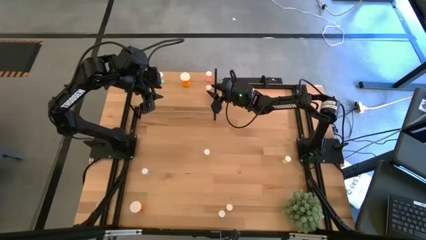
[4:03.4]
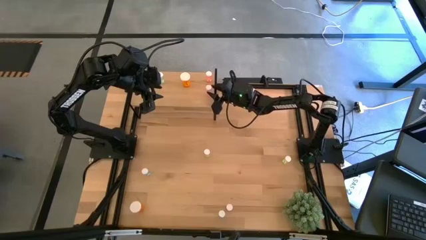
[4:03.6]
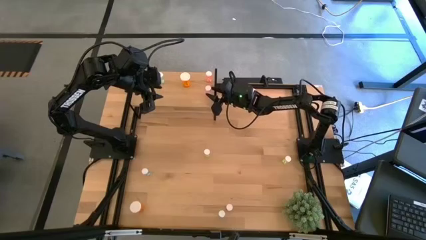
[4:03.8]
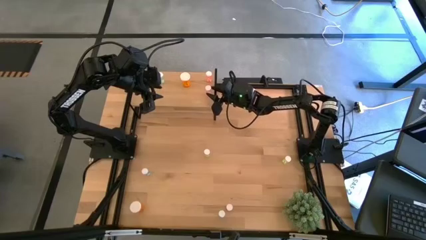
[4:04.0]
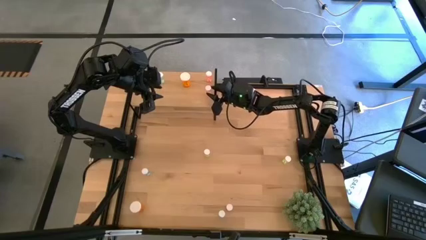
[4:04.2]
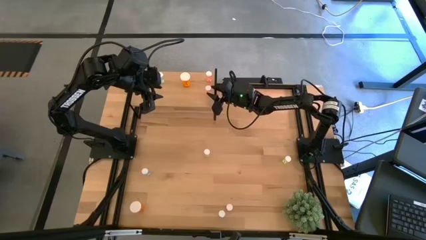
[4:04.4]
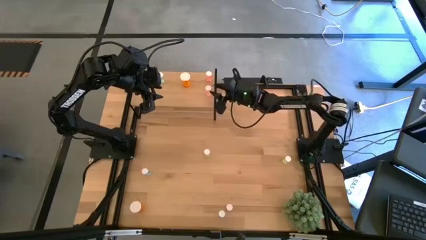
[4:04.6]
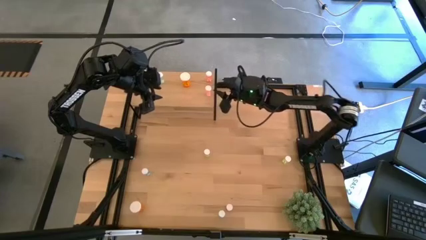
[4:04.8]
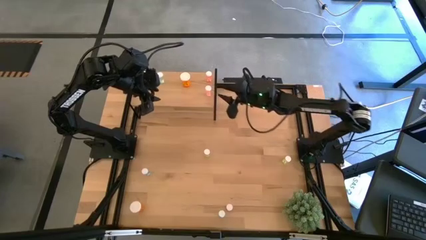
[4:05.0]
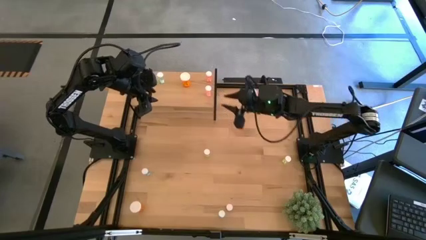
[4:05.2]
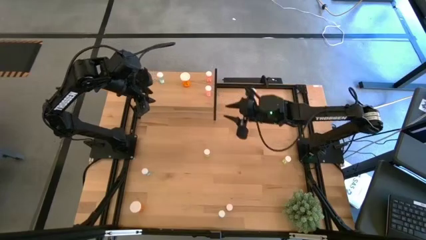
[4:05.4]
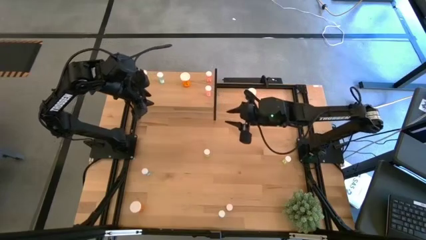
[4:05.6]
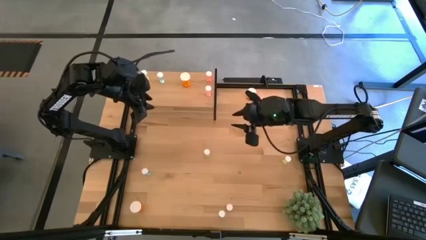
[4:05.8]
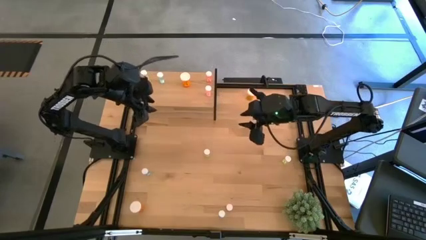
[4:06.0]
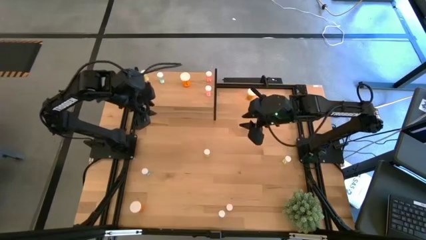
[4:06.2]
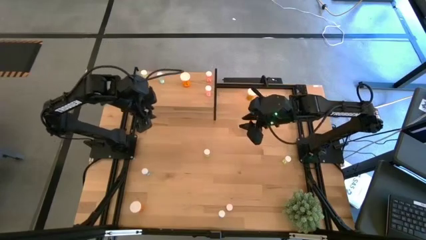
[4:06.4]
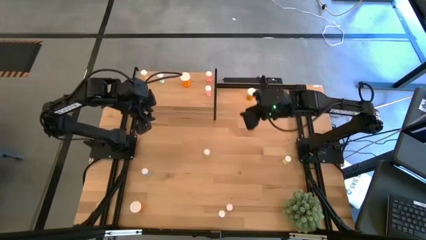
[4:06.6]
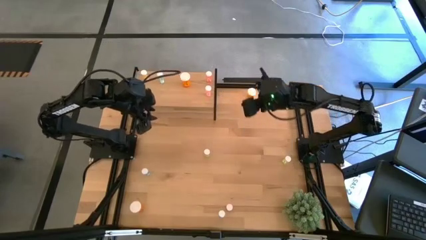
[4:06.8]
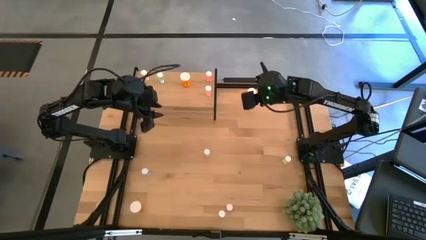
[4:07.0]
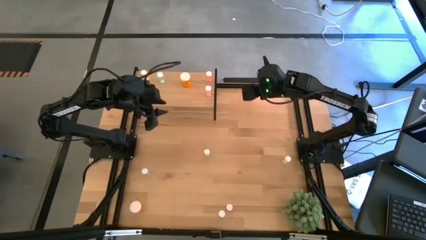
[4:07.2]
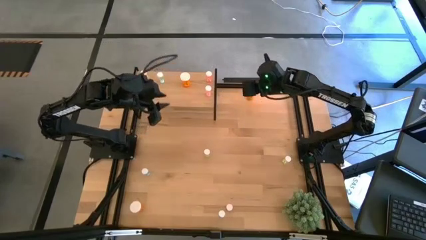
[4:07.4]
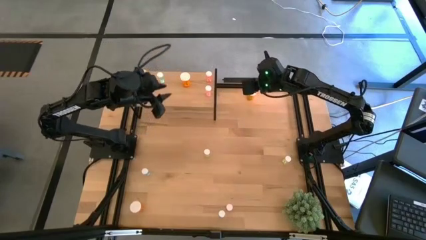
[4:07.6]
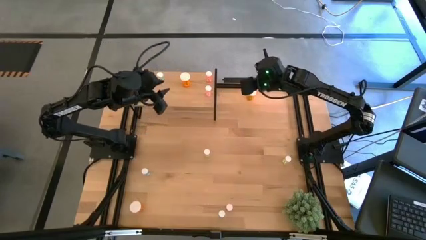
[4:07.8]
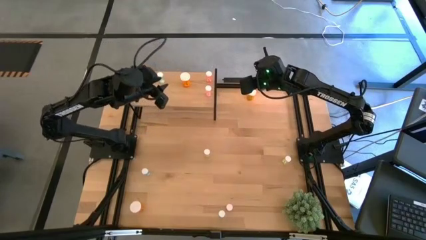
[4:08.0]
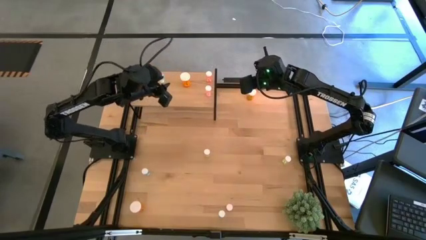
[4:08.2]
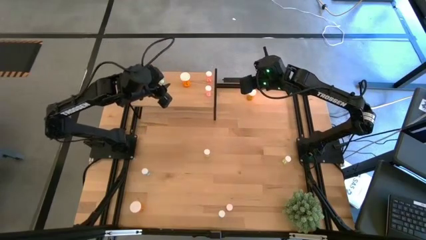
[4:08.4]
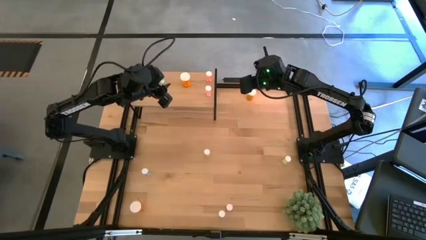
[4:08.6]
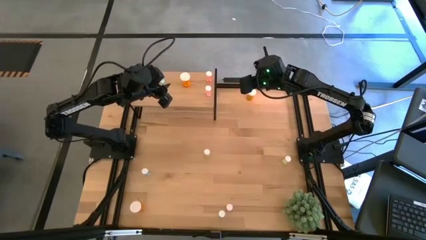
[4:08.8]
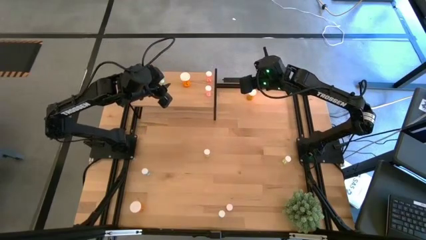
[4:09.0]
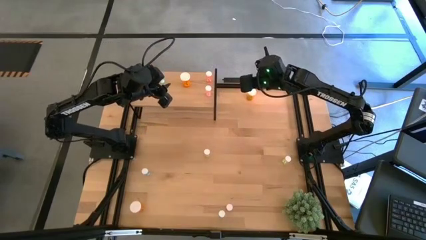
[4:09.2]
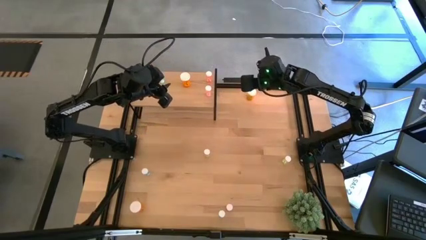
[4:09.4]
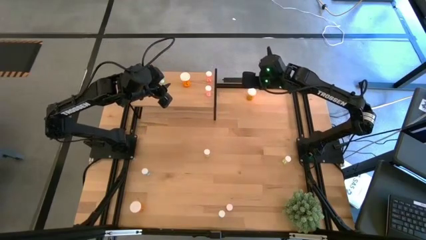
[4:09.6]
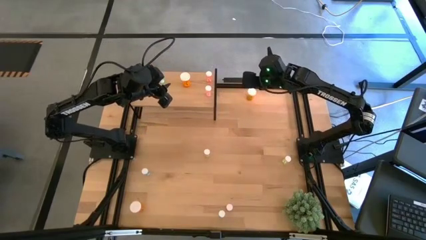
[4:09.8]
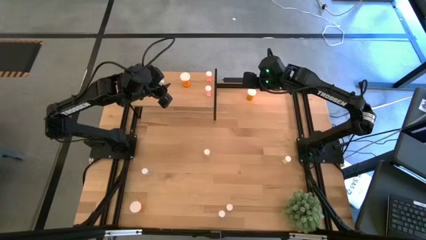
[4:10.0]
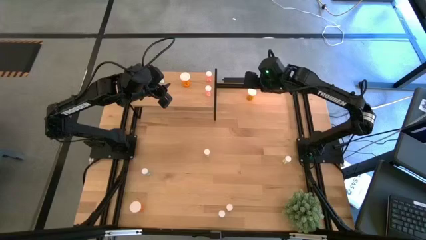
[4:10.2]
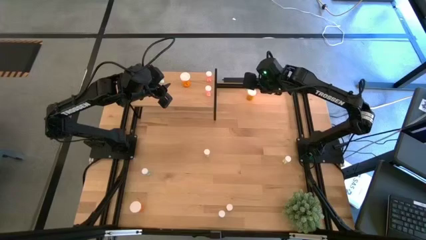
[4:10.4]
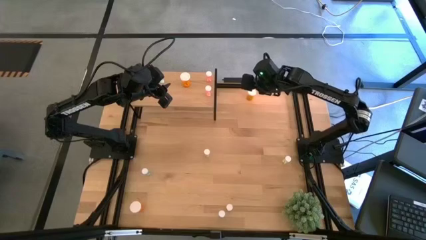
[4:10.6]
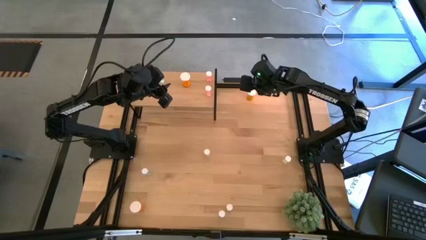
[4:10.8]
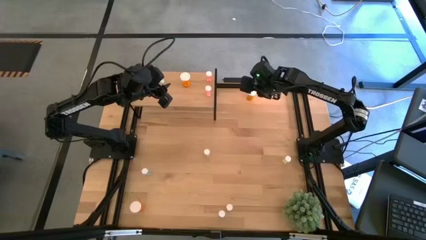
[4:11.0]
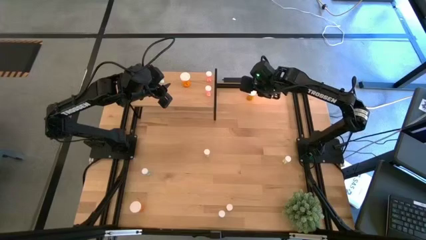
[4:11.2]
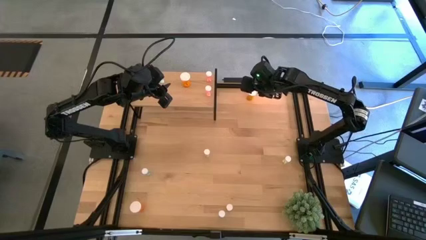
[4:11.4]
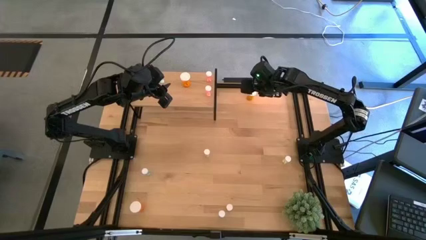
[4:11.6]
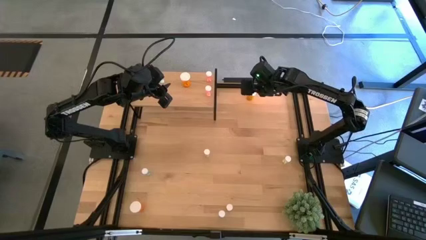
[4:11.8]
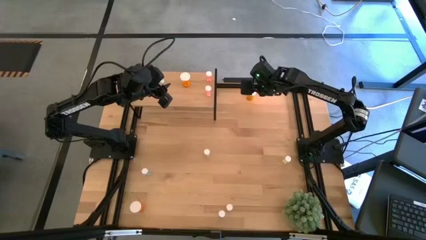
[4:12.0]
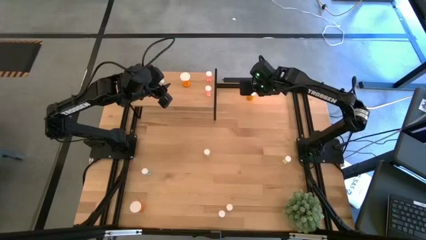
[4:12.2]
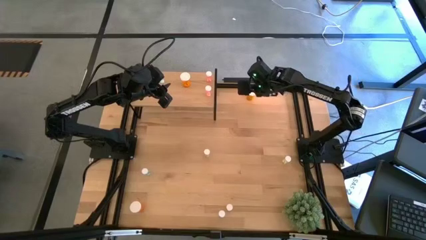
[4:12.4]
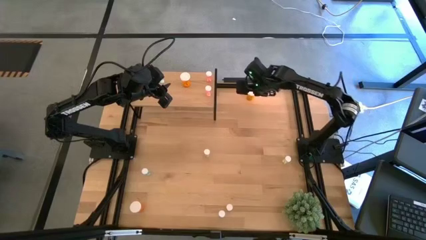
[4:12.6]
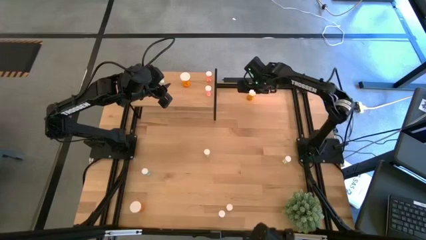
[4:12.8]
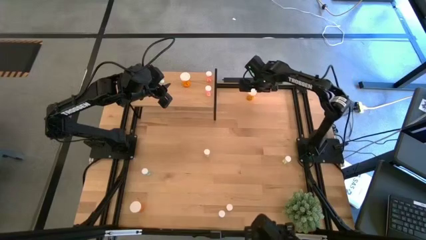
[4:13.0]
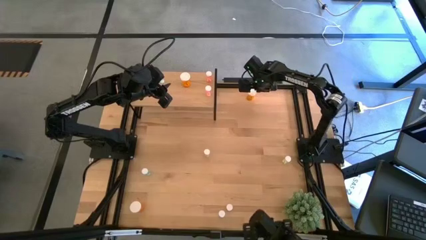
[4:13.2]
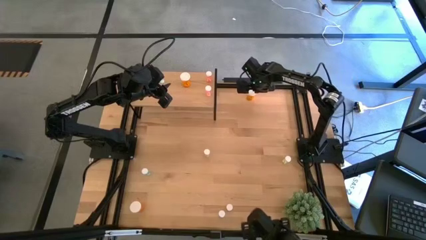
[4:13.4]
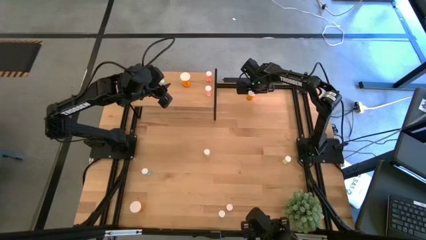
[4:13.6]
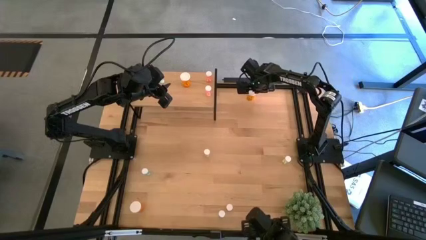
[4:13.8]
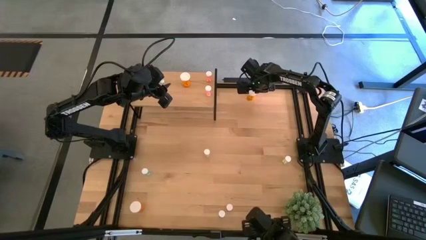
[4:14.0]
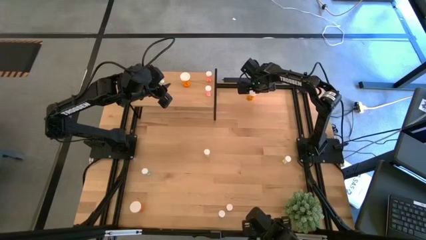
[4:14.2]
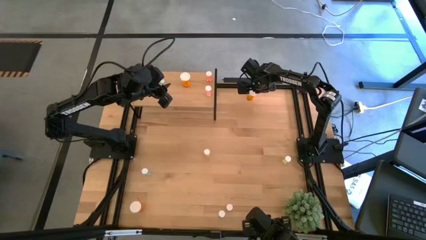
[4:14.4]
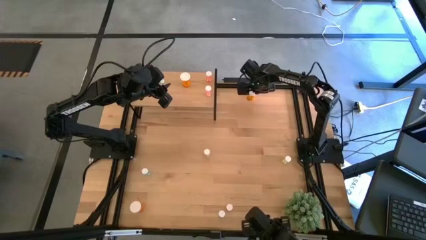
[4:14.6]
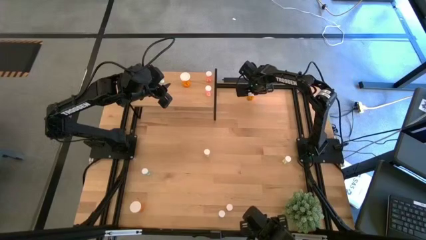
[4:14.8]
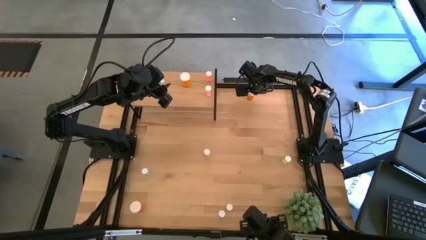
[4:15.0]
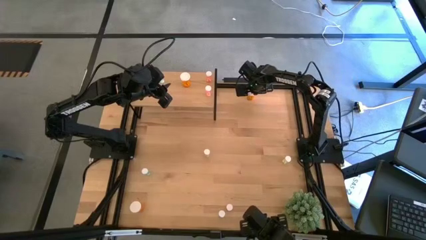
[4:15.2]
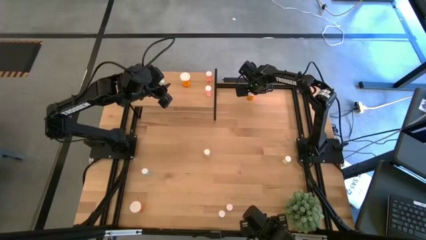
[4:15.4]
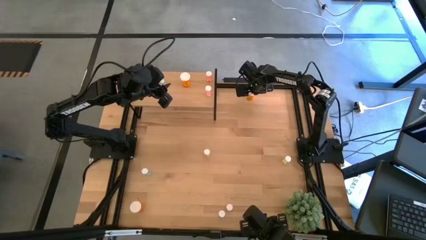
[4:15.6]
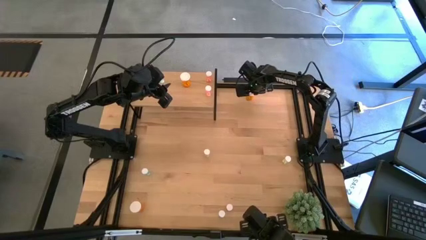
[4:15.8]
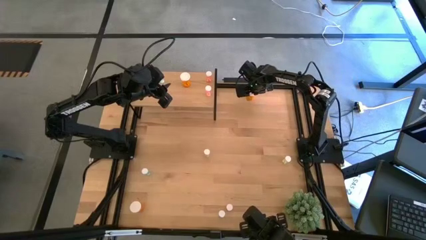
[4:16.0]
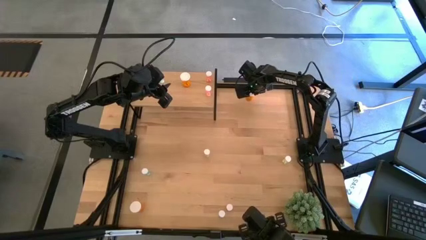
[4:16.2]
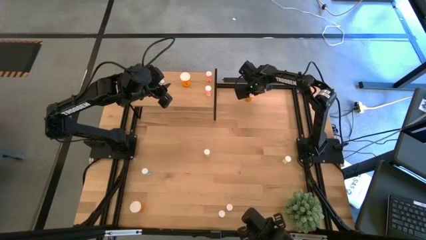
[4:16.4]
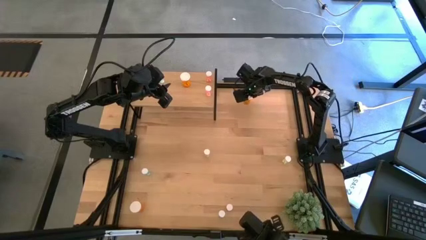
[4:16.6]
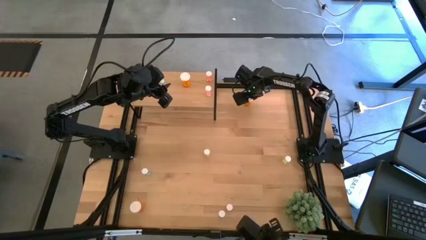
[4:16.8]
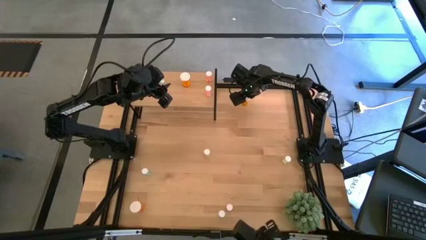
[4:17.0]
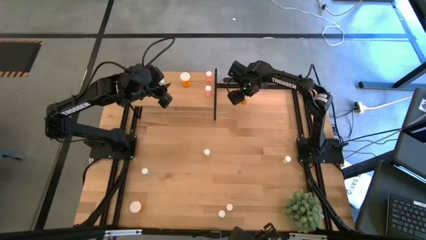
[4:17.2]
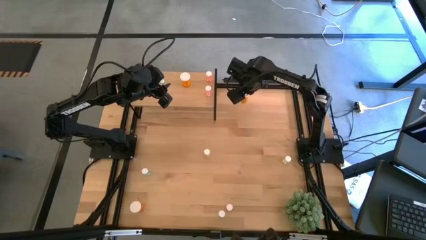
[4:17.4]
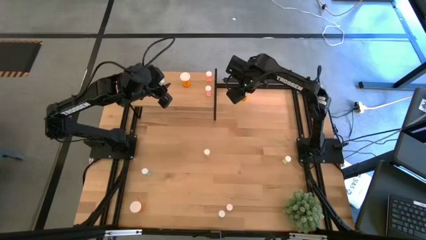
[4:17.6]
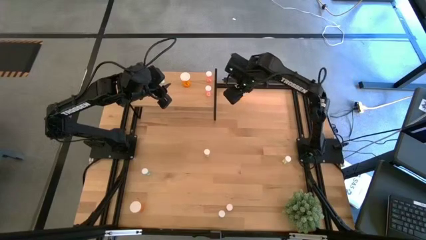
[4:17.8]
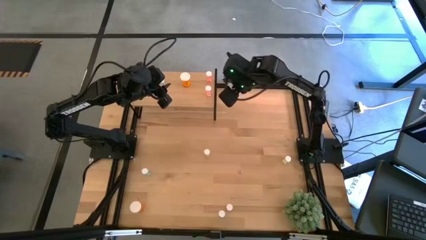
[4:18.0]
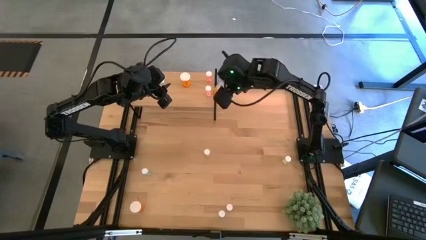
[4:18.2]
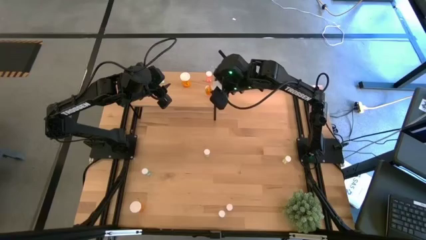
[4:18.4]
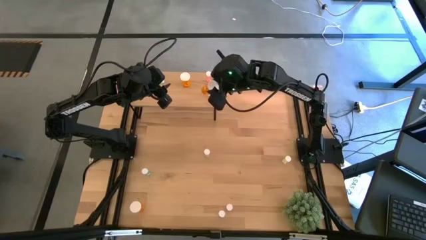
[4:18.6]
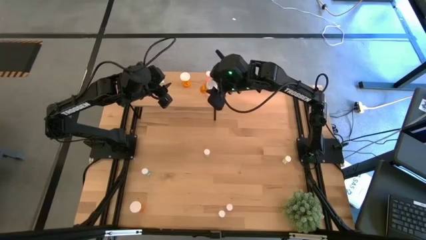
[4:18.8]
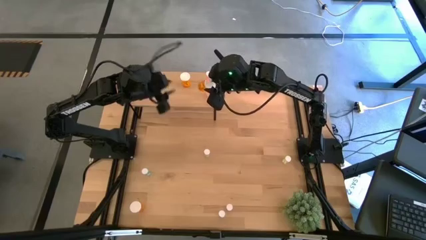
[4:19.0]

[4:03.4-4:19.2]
Task: Pick and place medicine bottles onto shelf by color
Put the top big orange pill bottle on the shelf aligned with the orange pill bottle on the shelf
